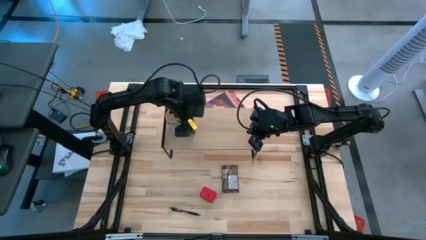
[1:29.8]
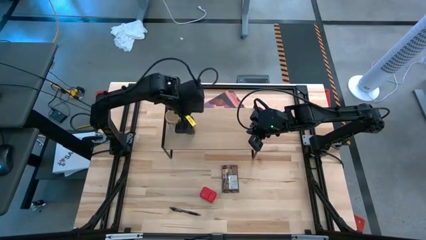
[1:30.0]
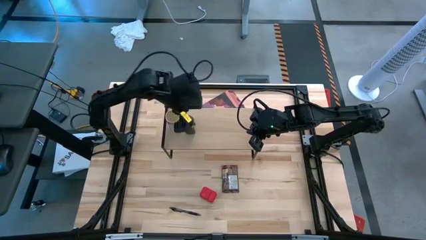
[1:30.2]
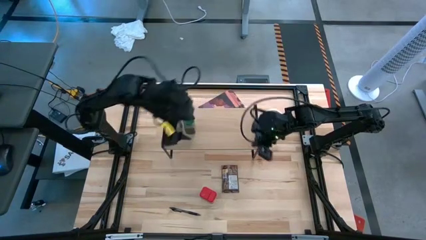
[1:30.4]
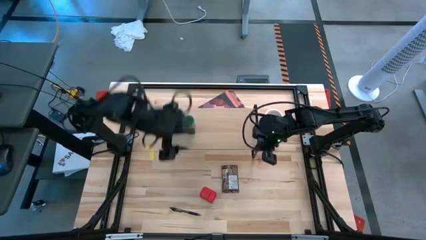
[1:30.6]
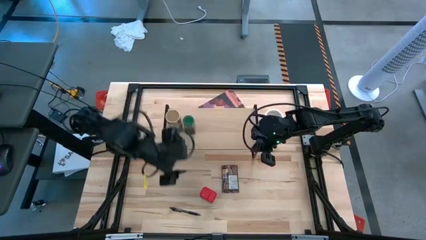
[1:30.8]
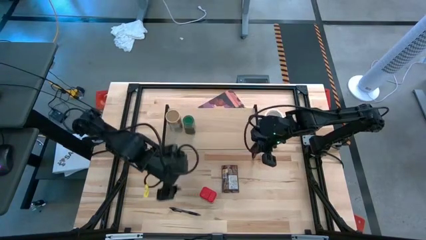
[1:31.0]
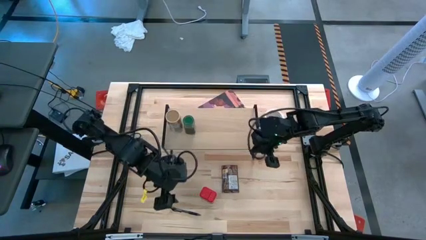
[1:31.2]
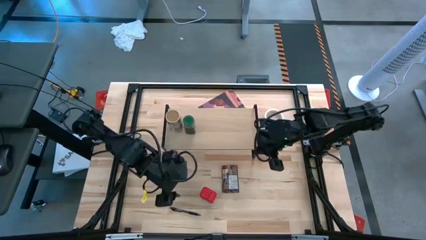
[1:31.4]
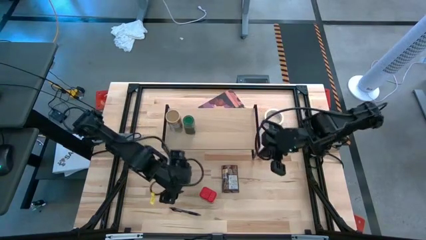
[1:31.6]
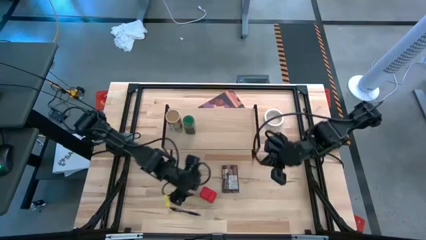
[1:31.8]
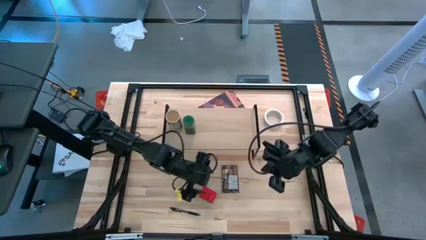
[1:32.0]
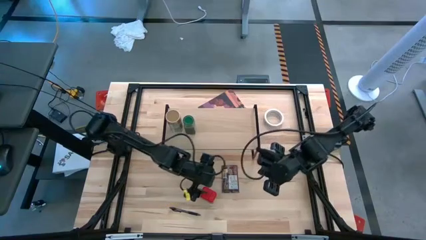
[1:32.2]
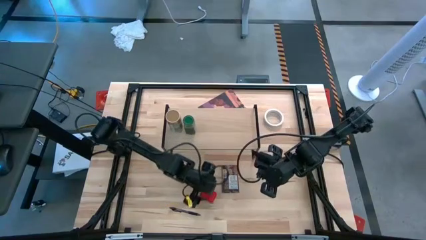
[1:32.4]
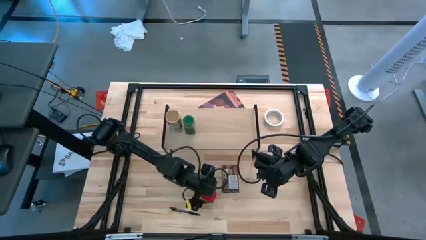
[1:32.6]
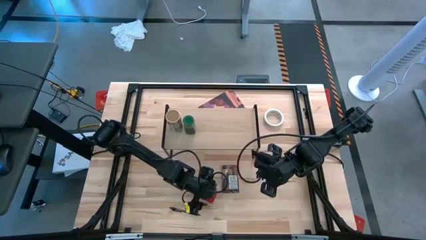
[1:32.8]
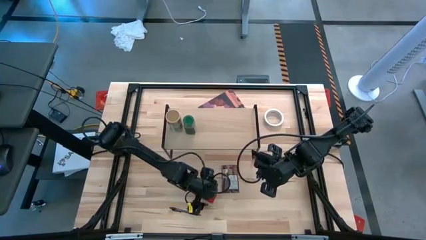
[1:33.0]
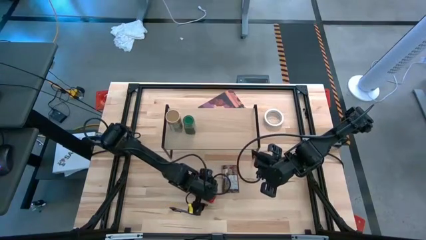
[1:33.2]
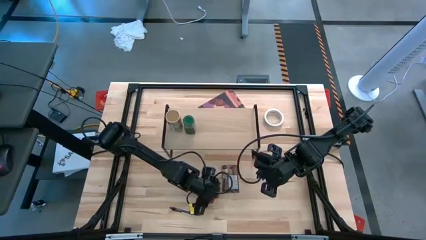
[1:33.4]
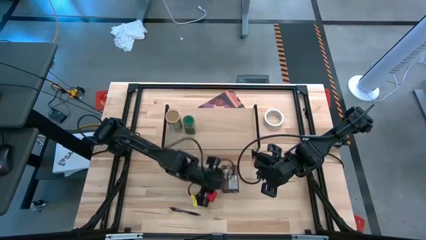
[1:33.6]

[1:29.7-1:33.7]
Task: Shelf spices
Put the red seasoning can on the shelf

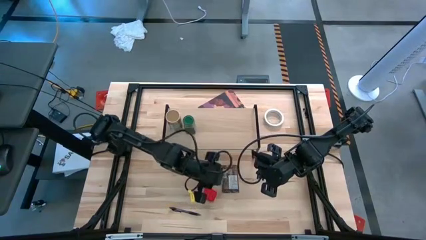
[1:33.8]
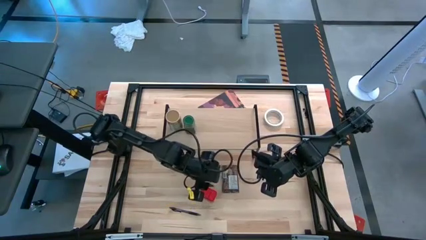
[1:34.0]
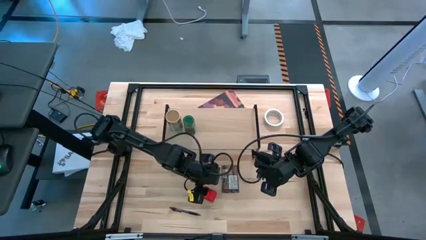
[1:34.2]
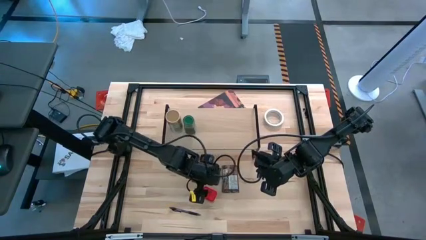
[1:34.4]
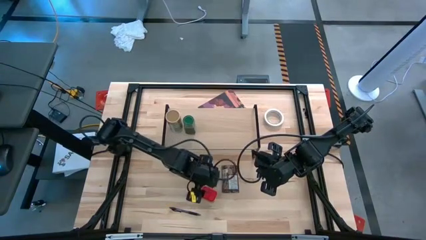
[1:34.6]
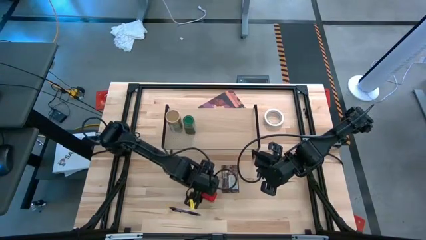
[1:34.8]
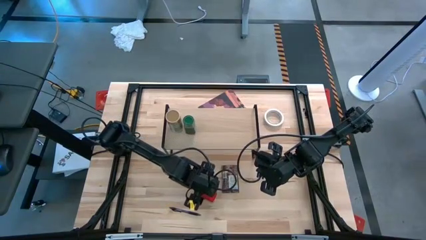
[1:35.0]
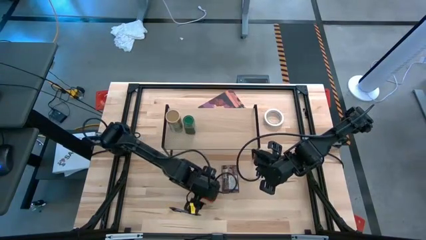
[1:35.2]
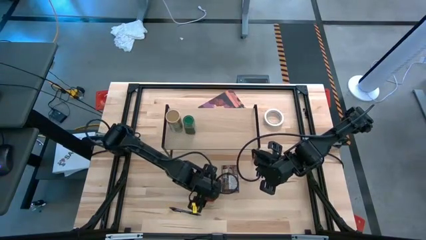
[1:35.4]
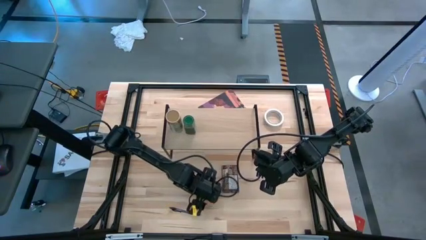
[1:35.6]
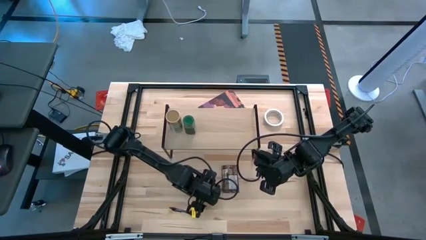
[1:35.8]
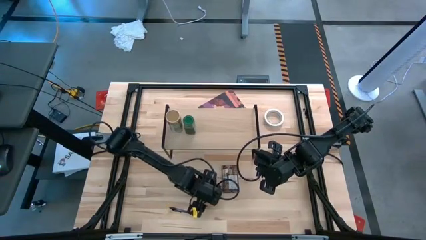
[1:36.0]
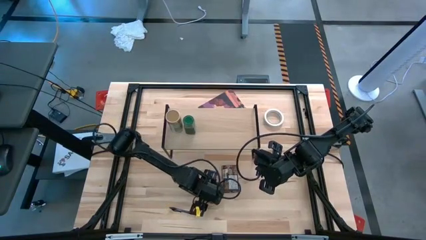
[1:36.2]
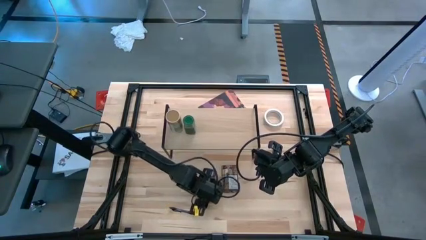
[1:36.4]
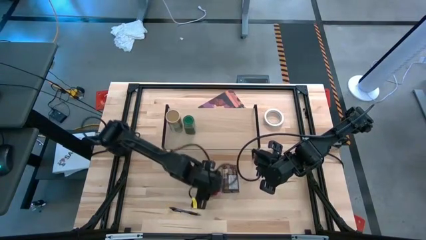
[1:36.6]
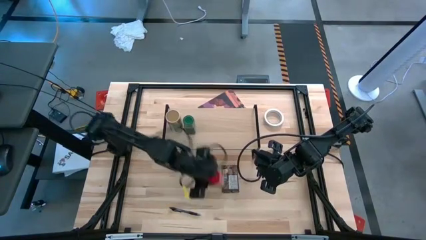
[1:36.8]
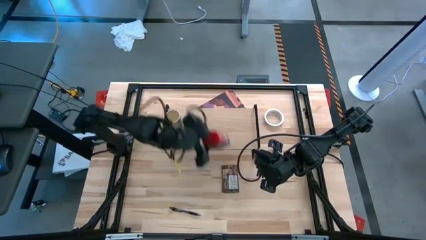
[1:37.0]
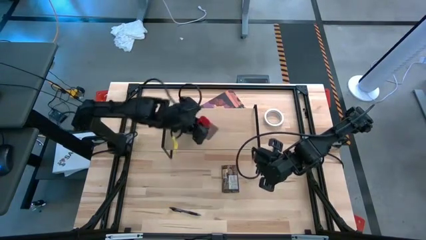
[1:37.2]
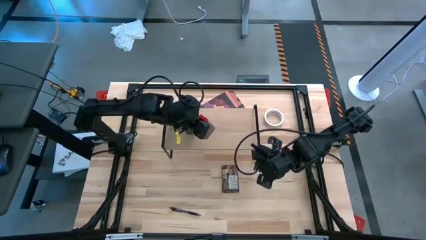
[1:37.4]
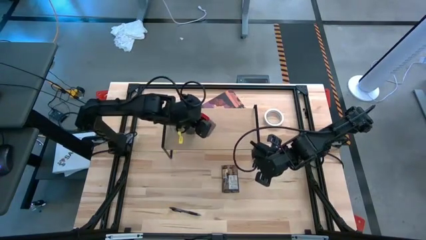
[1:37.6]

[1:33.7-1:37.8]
Put the red seasoning can on the shelf

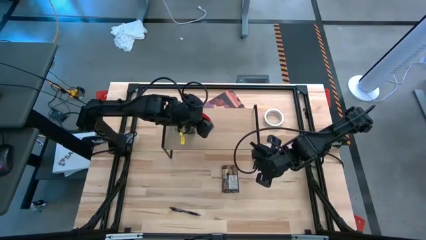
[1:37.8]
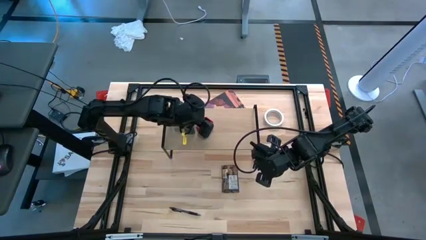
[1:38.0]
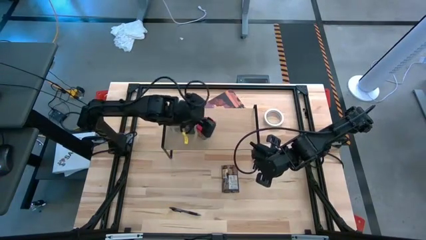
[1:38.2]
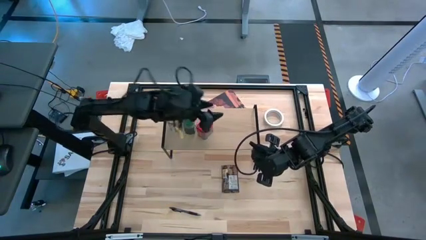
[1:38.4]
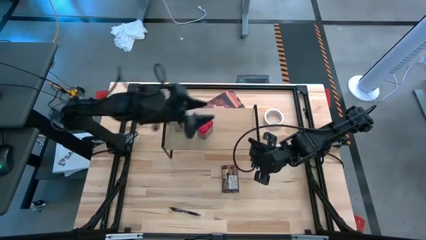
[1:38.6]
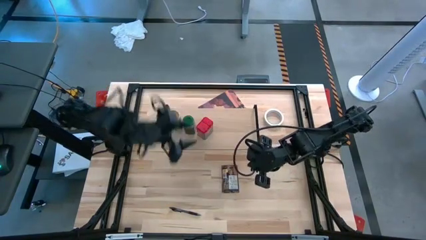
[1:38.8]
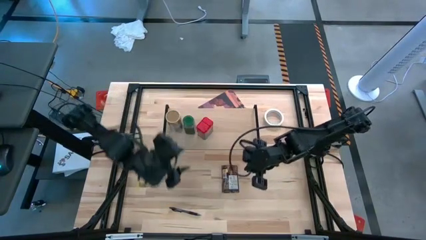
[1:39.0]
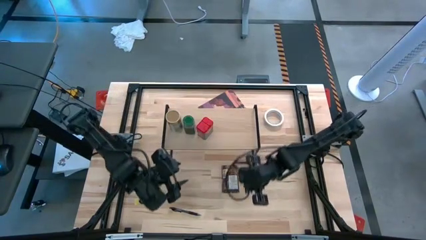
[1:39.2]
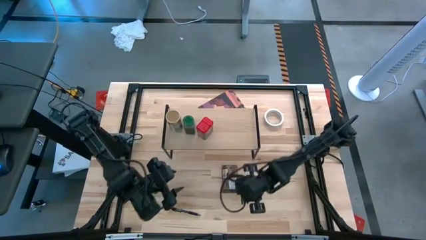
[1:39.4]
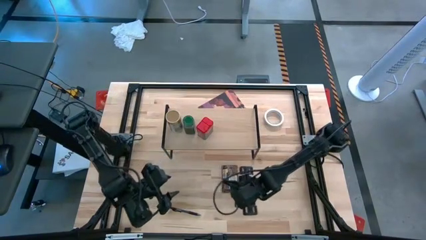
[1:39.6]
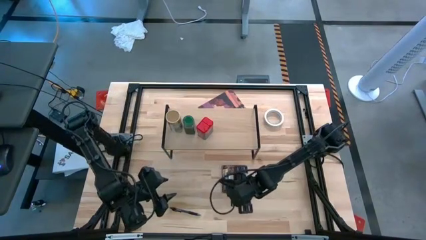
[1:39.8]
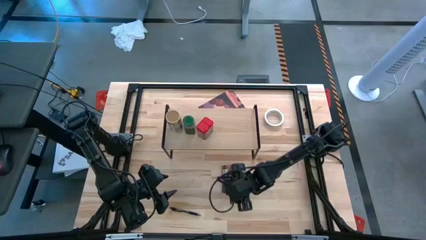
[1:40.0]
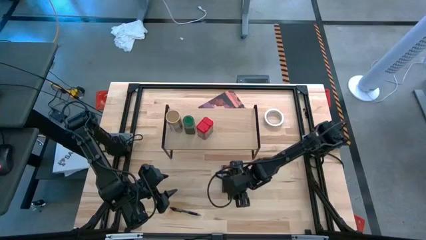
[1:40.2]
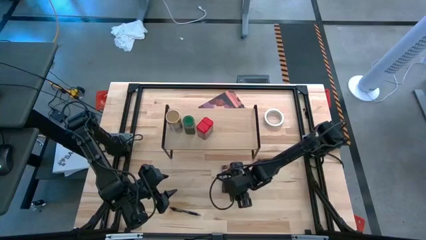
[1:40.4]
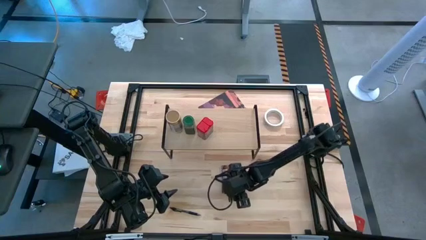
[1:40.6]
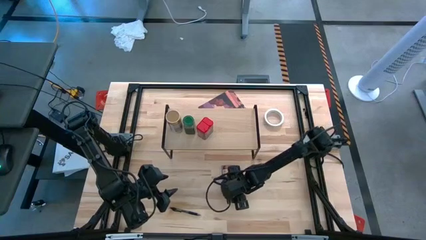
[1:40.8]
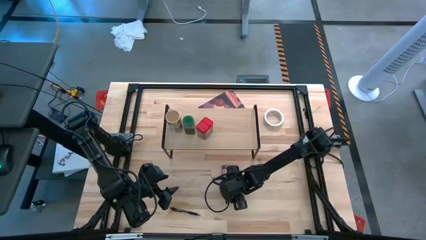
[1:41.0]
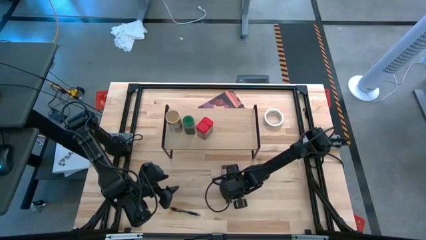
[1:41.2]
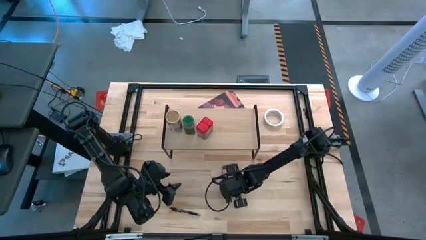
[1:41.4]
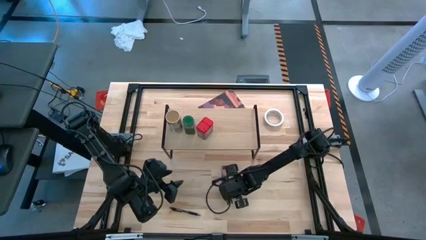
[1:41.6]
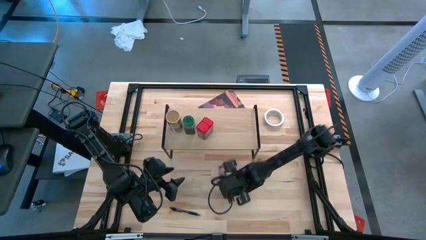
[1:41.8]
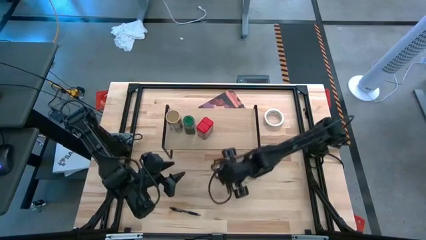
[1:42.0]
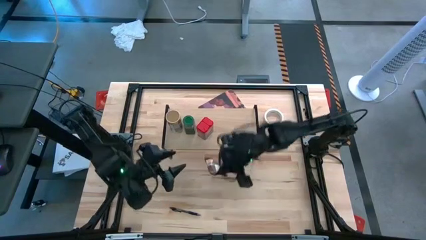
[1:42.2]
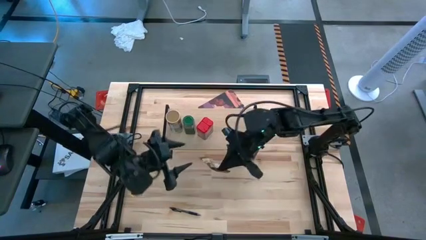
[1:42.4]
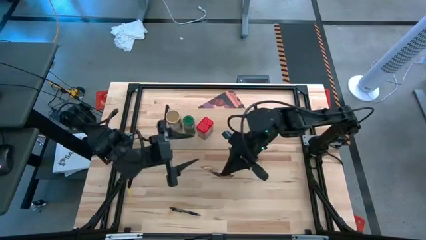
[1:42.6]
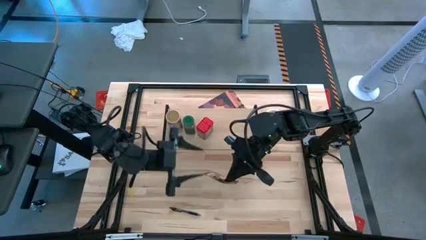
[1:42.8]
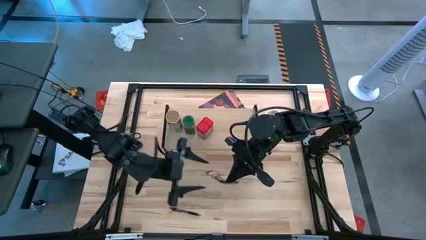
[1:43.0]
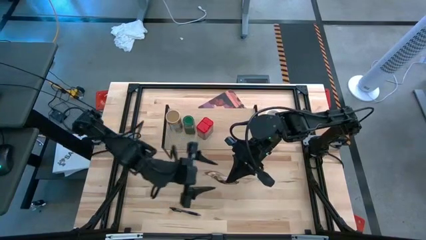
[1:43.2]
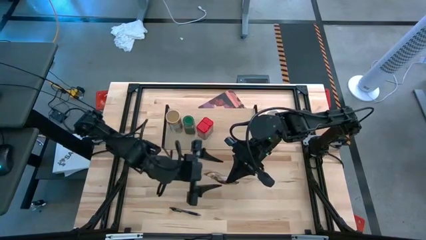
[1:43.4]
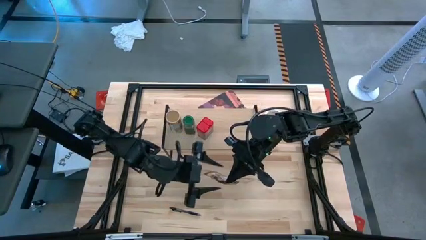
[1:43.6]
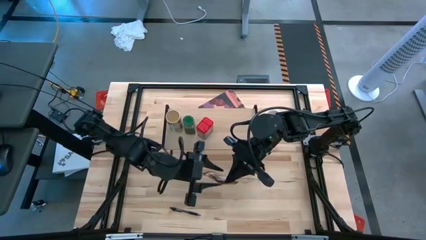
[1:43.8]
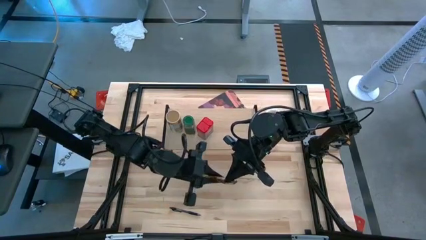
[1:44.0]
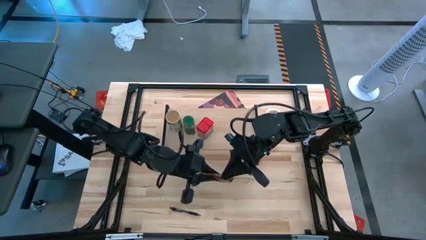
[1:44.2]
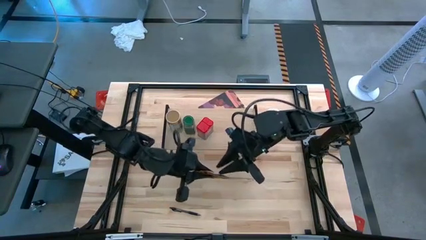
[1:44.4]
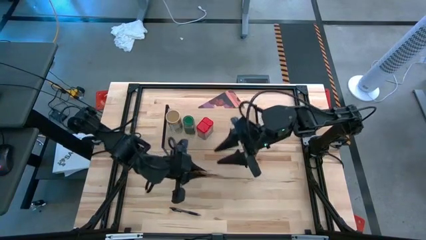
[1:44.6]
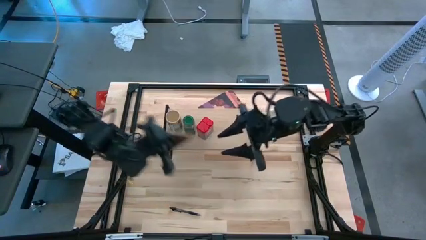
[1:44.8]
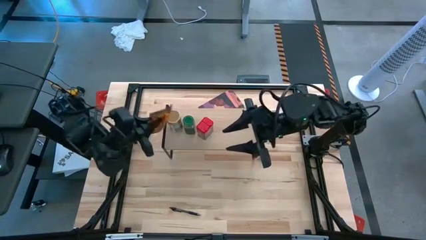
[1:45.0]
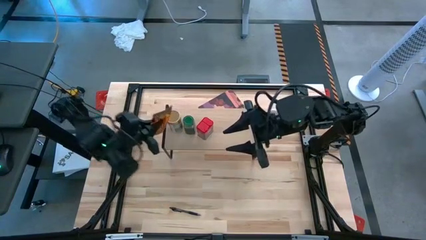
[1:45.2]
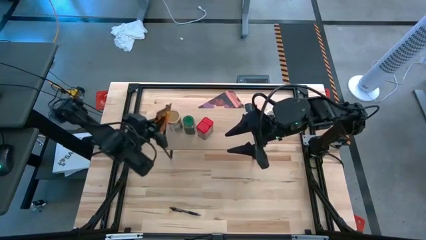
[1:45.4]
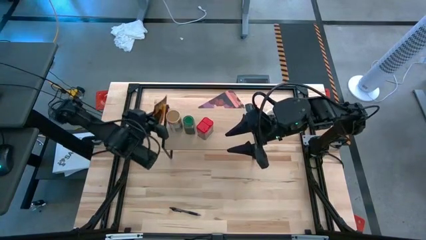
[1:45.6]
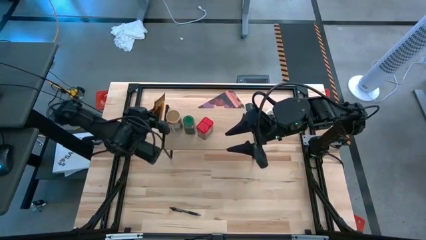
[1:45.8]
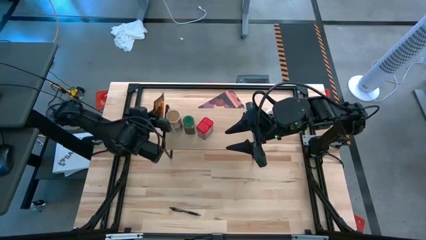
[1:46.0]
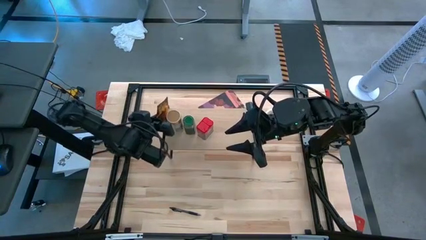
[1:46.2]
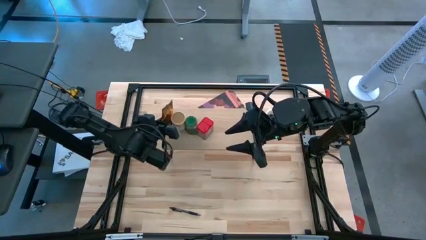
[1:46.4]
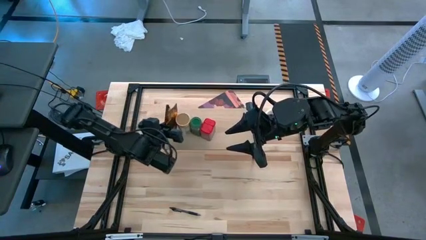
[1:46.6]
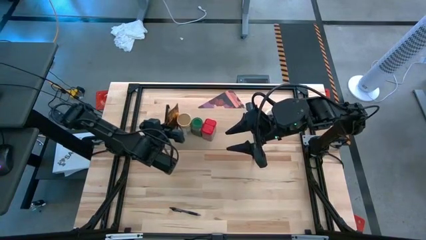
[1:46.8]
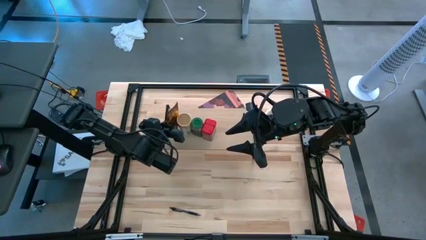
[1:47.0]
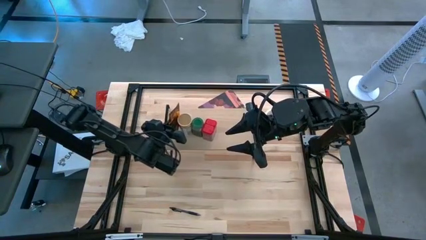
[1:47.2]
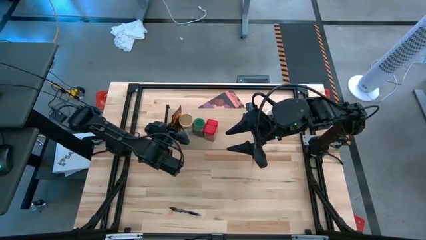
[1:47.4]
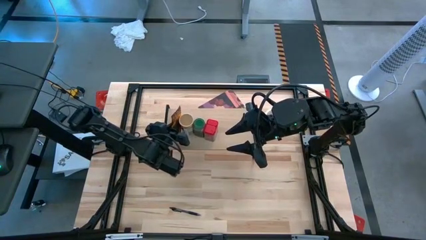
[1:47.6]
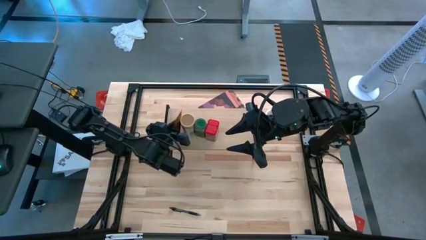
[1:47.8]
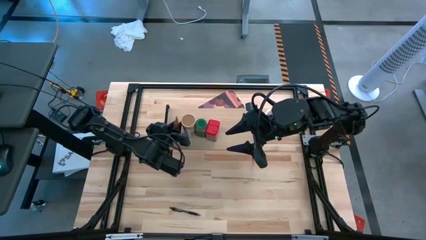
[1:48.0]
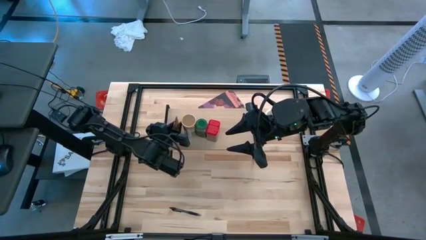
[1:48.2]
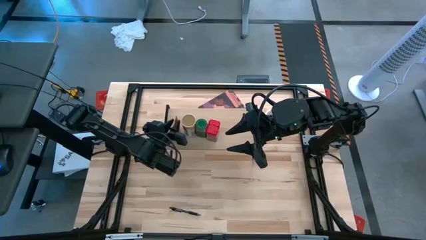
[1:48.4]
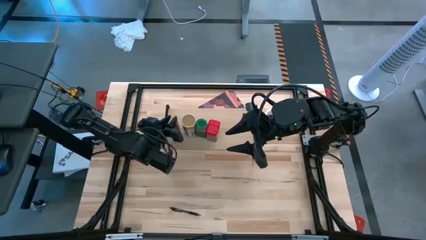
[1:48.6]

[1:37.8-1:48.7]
Put the orange seasoning pack on the shelf
